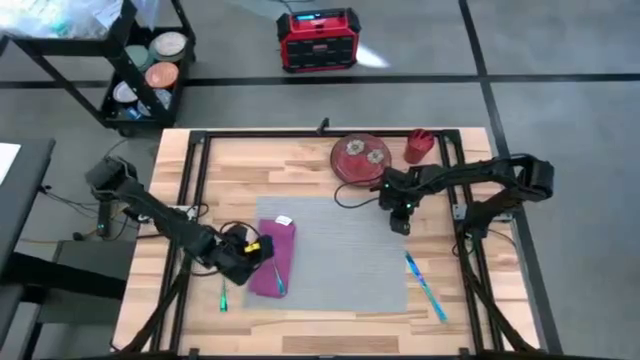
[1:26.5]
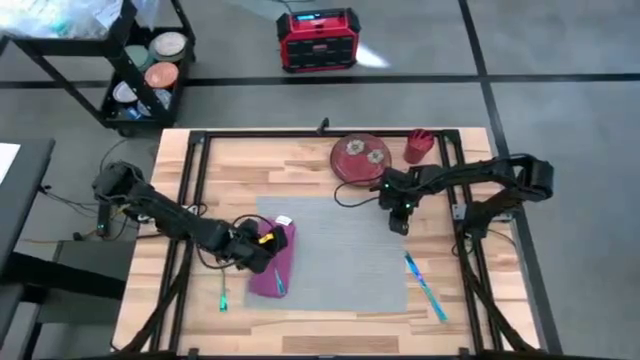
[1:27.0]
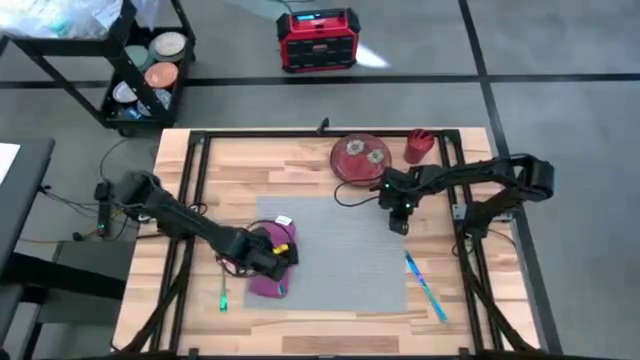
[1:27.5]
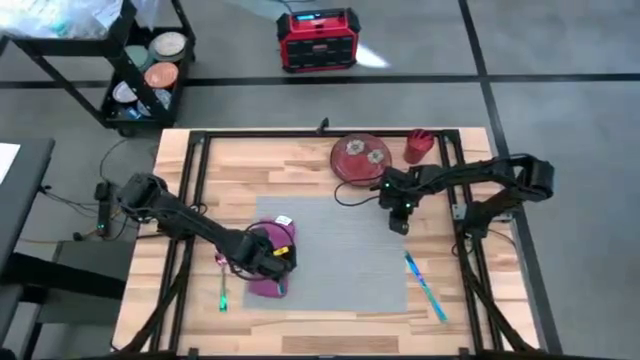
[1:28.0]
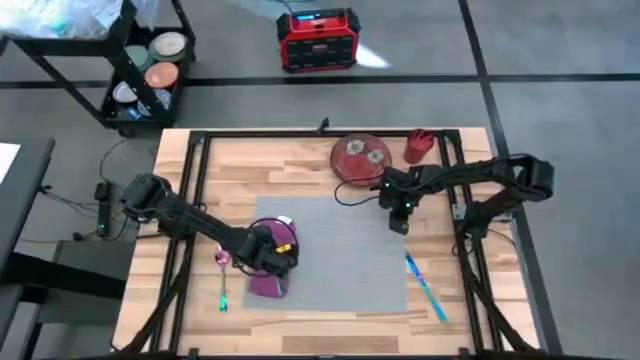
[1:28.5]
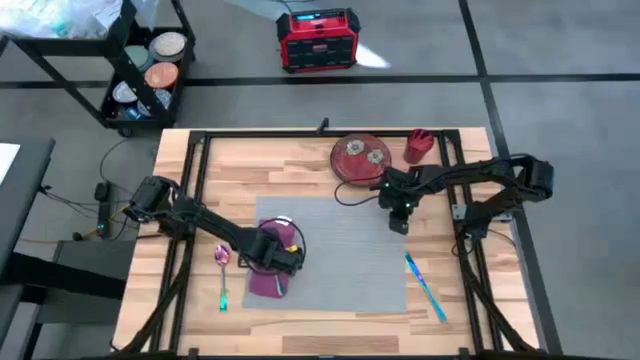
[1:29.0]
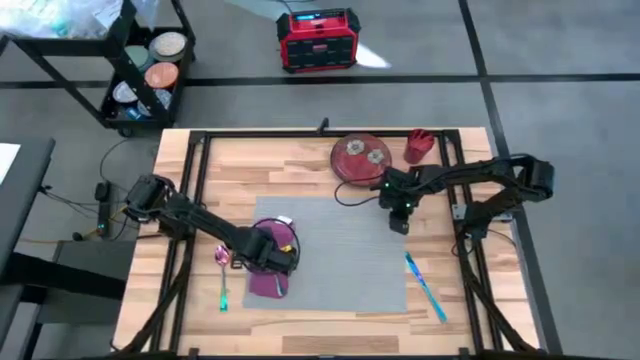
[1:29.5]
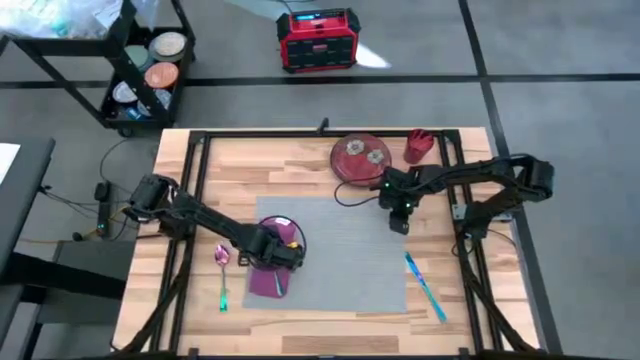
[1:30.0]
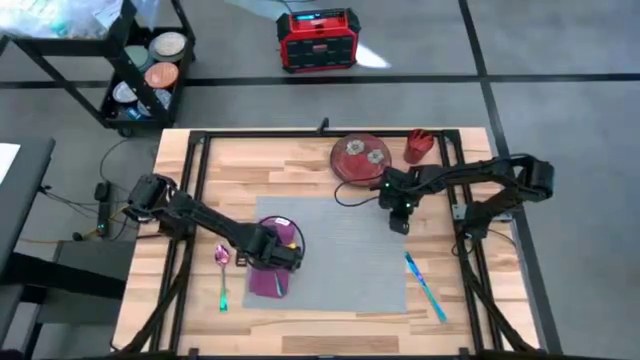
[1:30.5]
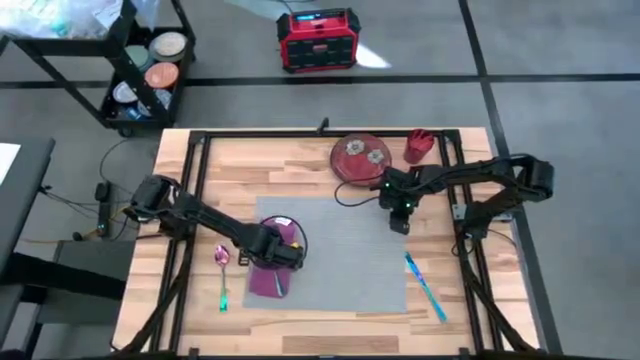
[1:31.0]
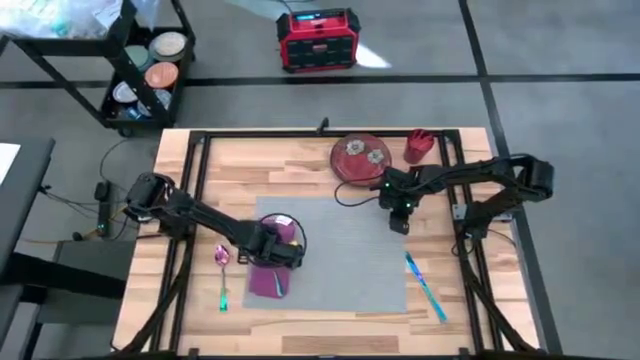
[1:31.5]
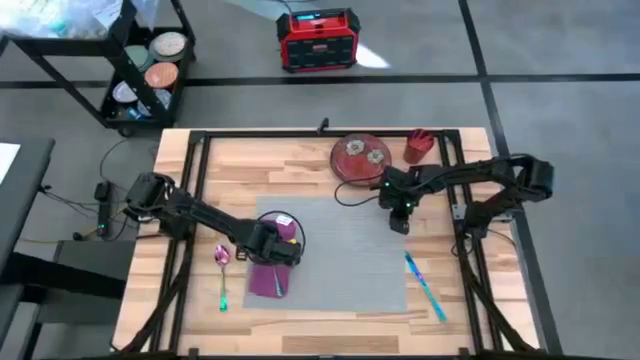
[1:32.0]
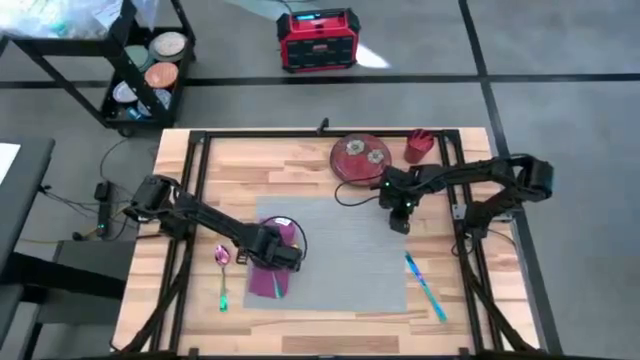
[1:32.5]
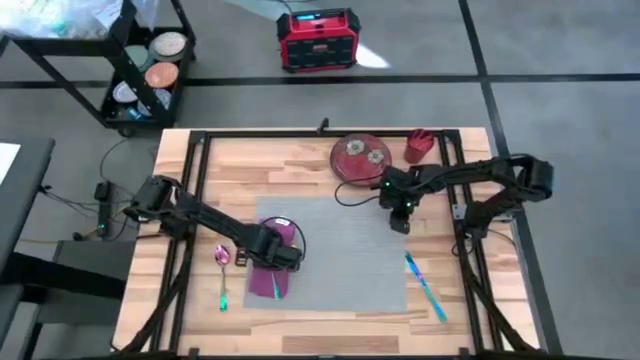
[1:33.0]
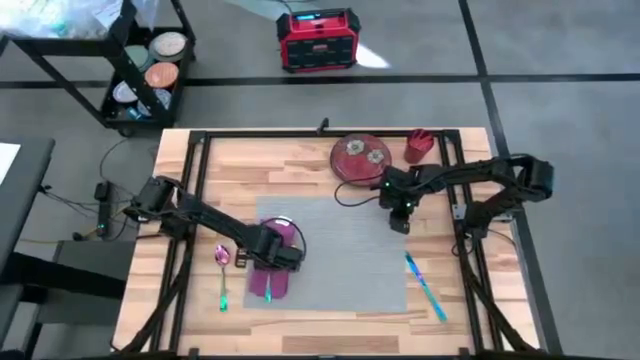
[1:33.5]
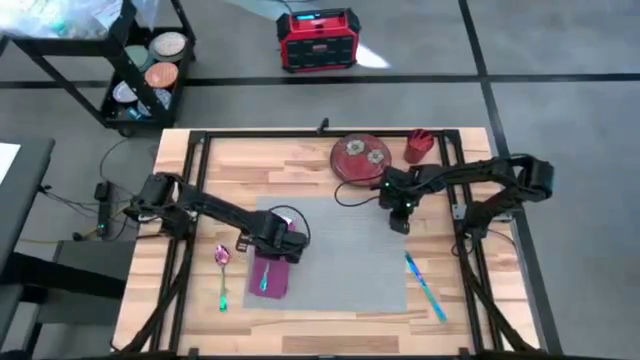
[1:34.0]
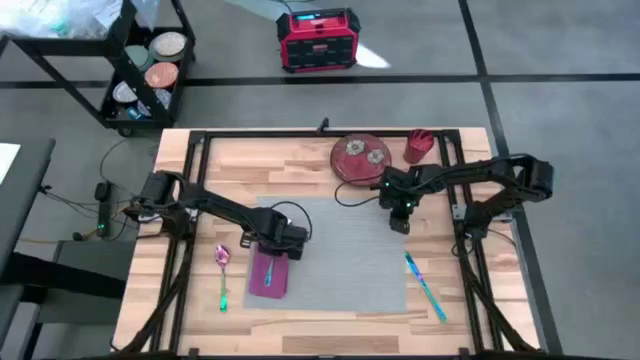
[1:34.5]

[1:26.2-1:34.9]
Task: Set table place
Adjust the blue fork on top of the violet table napkin

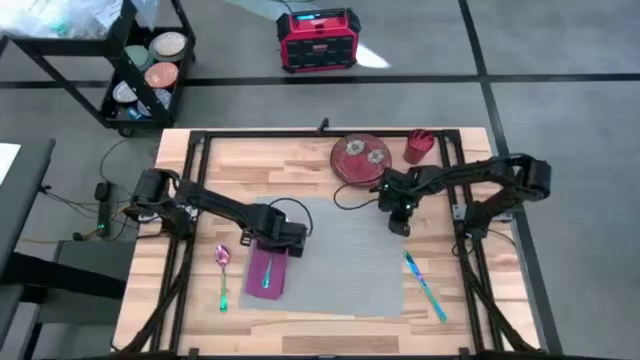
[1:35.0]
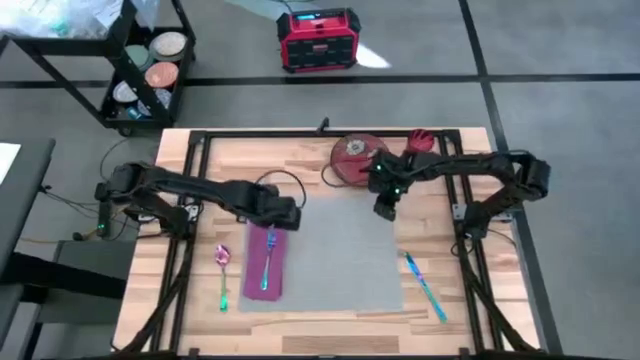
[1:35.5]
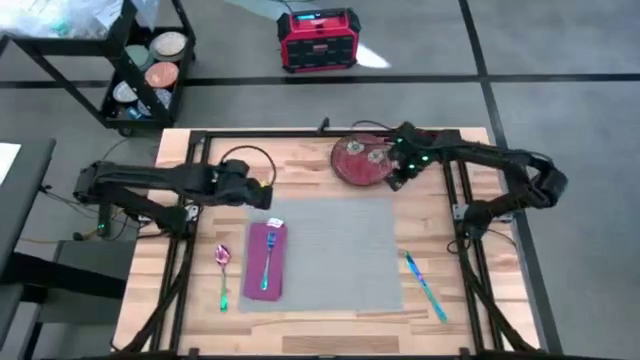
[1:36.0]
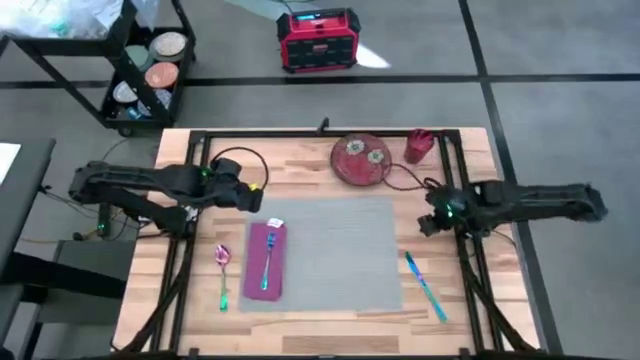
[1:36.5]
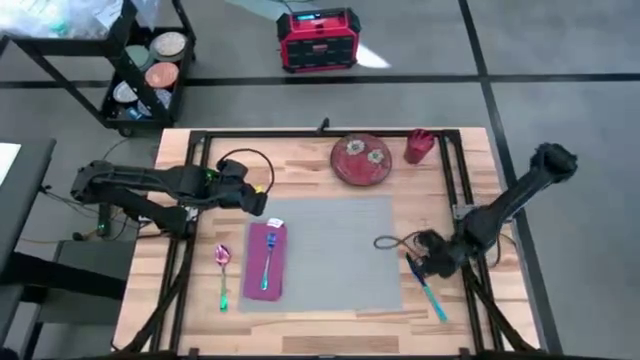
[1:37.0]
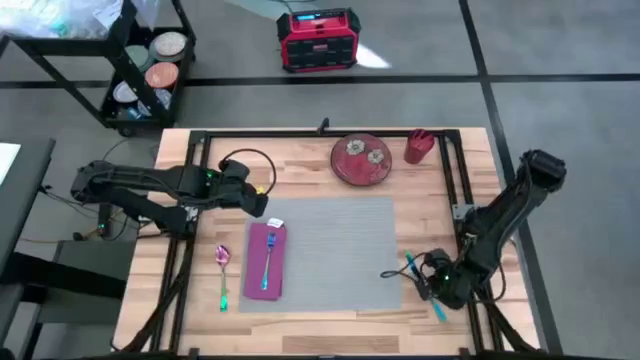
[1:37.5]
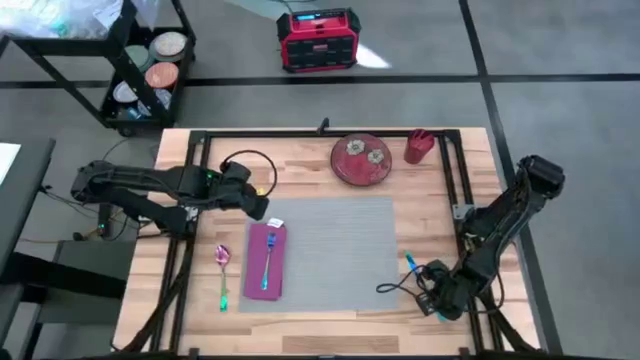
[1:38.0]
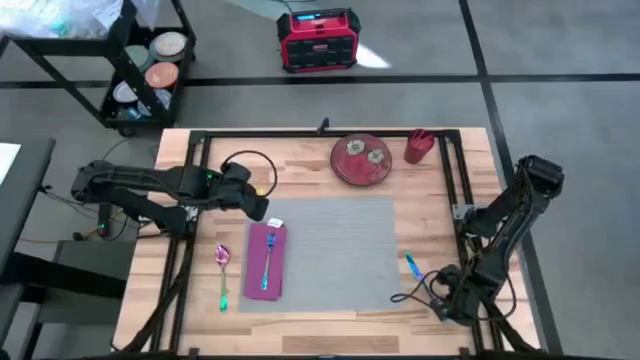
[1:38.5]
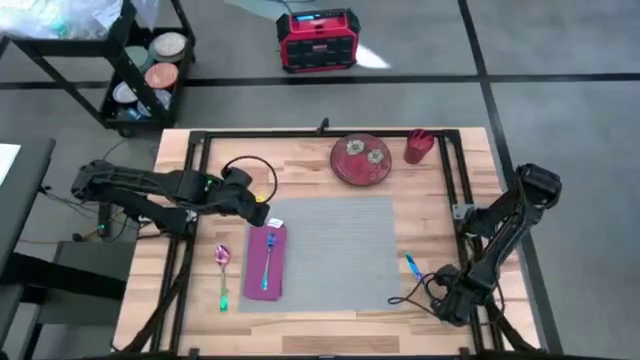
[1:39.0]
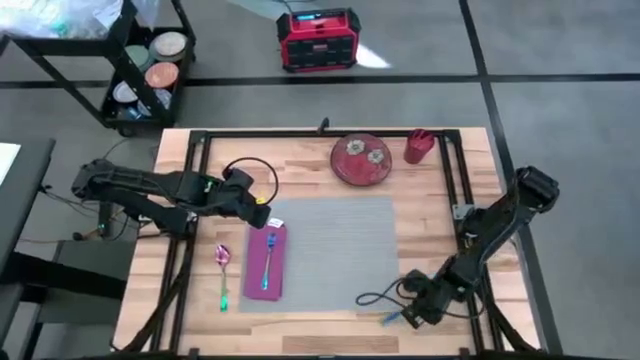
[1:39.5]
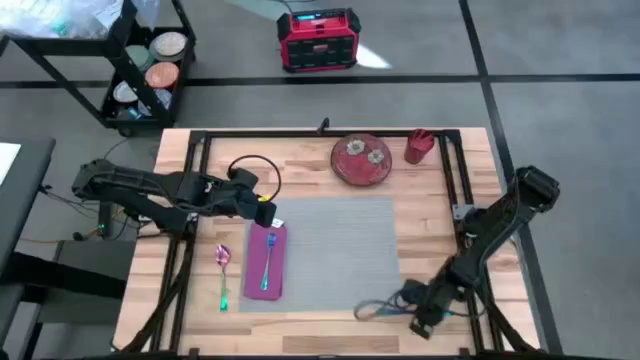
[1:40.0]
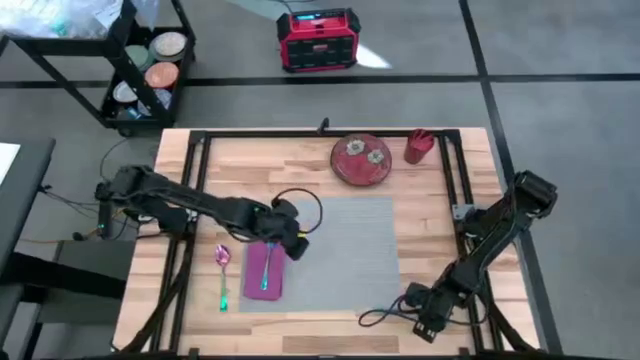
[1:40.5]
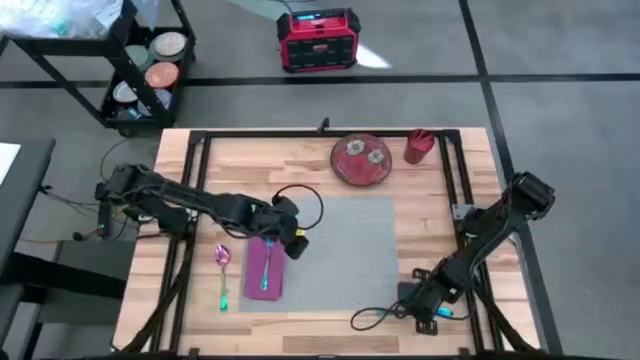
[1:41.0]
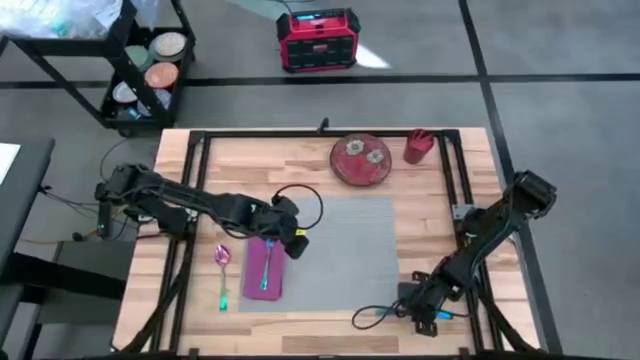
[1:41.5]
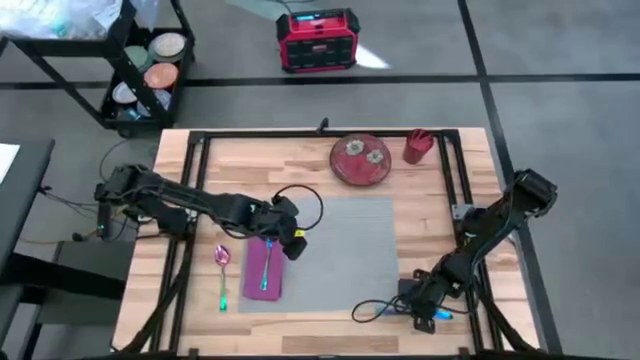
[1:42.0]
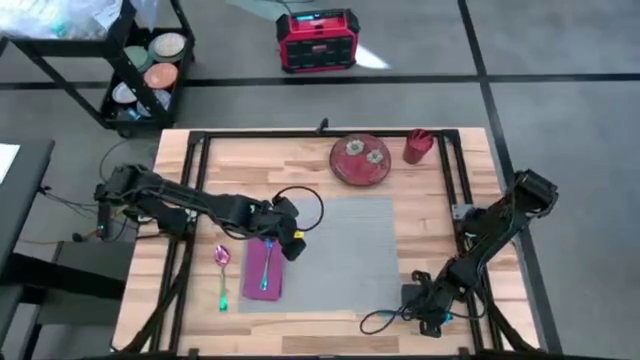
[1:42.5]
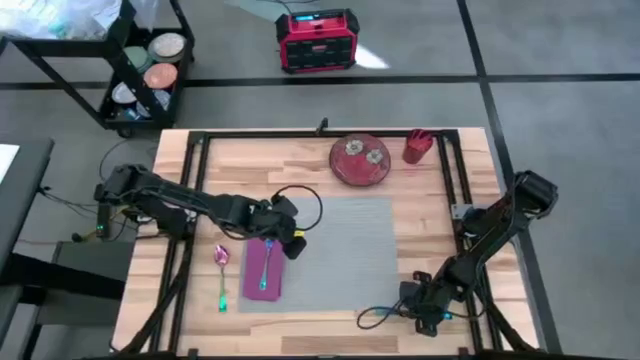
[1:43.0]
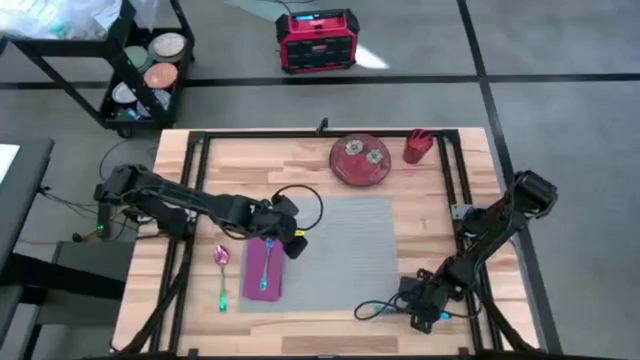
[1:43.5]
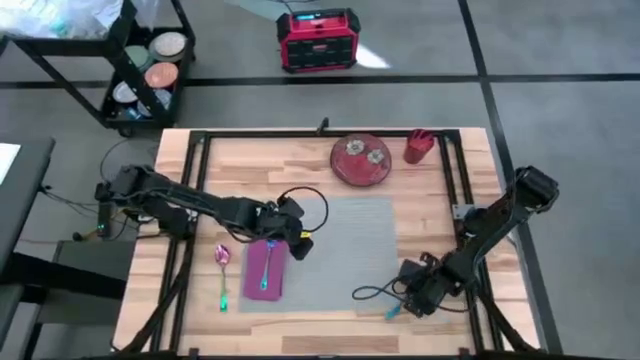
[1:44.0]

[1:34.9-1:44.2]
Put the blue table knife on the gray table mat

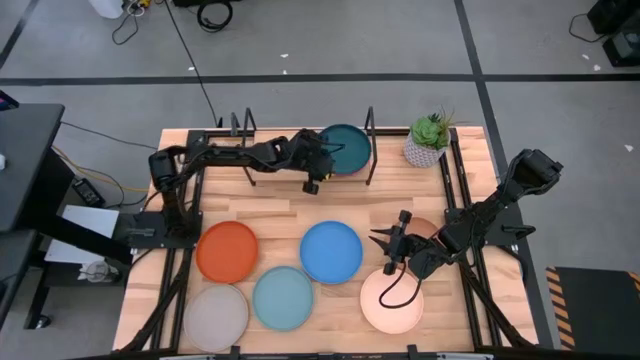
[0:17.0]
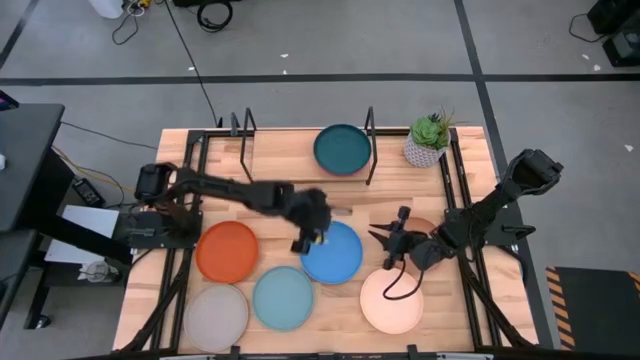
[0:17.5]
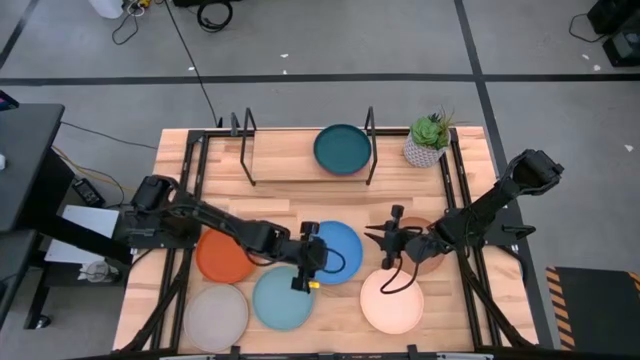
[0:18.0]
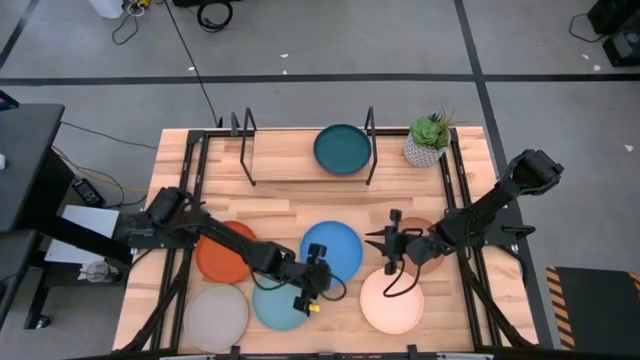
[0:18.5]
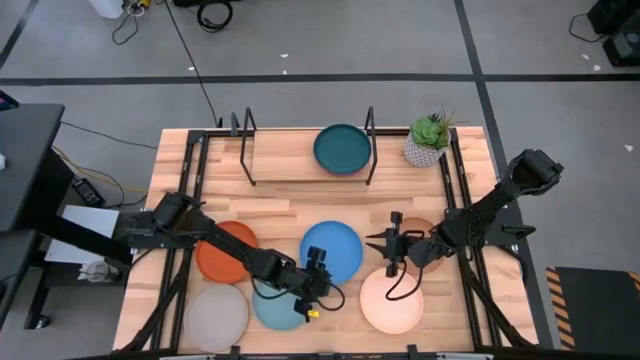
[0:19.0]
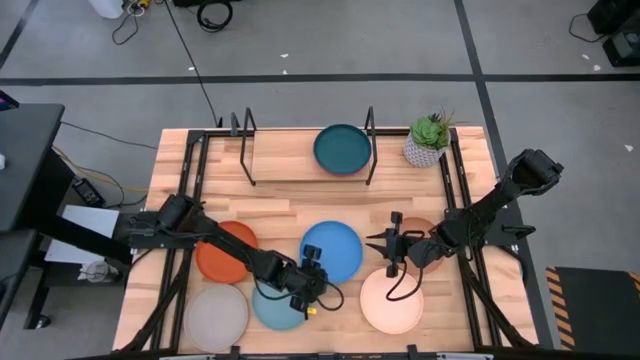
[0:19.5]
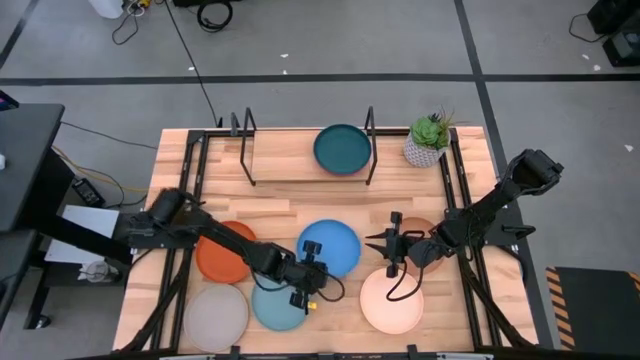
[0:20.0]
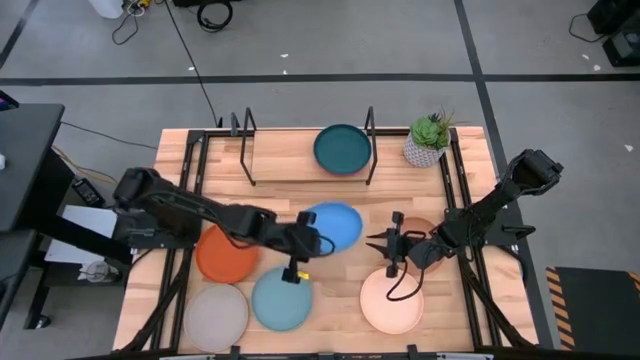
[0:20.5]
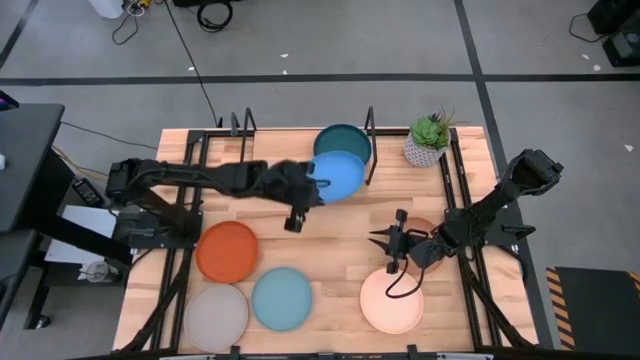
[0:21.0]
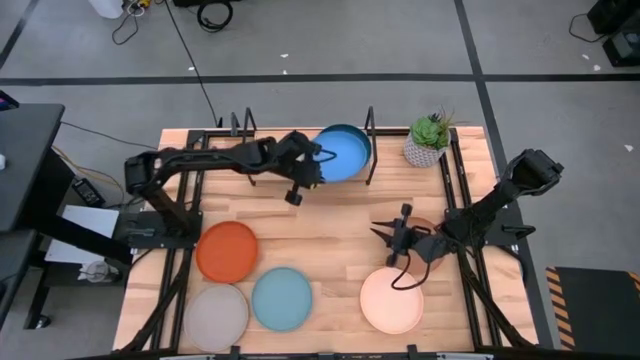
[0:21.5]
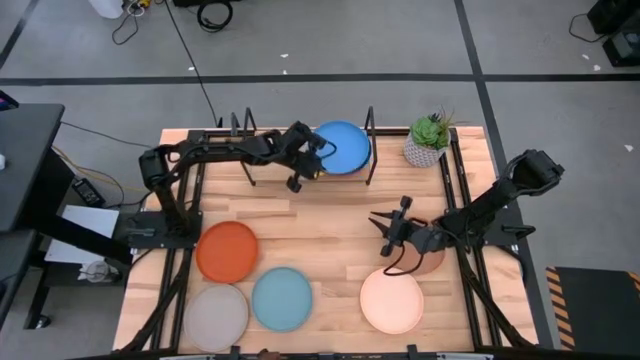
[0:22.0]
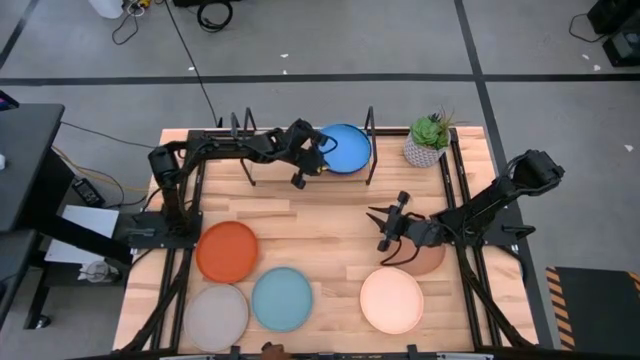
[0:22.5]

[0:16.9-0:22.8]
Task: Place and stack plates onto a shelf
Stack the blue plate on top of the dark green plate on the shelf
